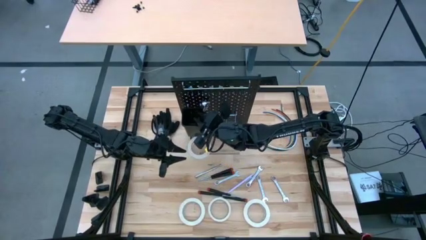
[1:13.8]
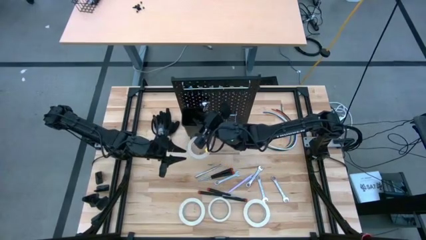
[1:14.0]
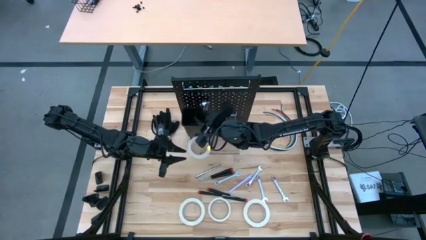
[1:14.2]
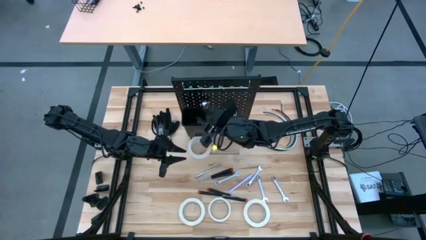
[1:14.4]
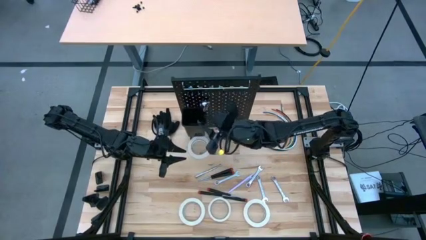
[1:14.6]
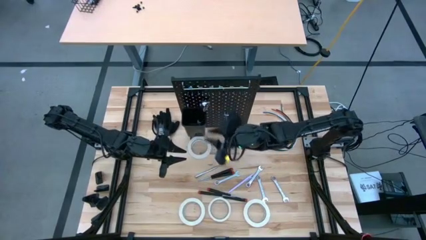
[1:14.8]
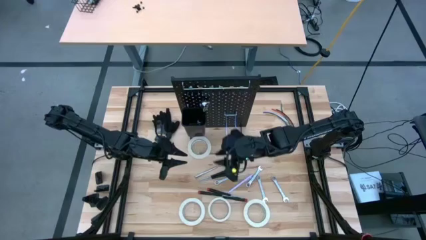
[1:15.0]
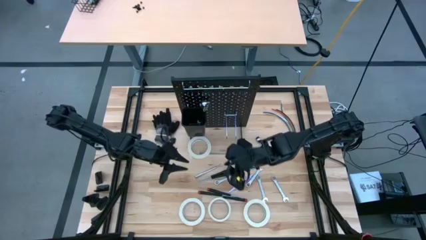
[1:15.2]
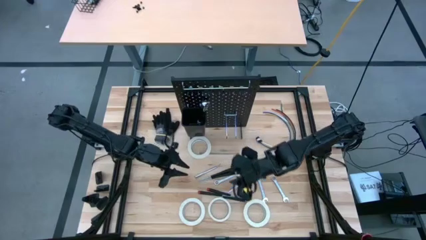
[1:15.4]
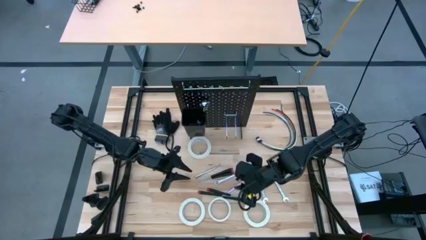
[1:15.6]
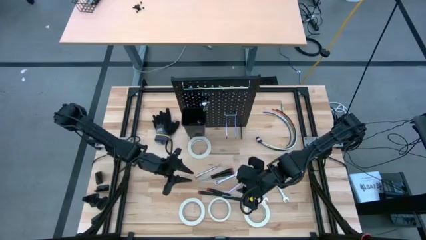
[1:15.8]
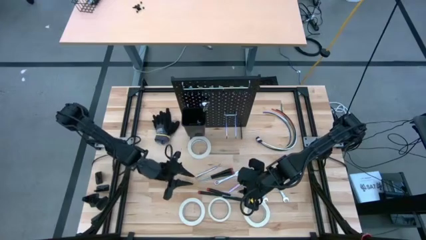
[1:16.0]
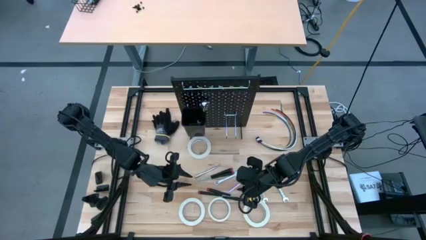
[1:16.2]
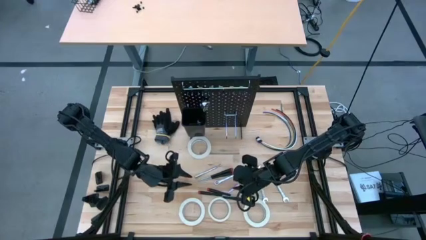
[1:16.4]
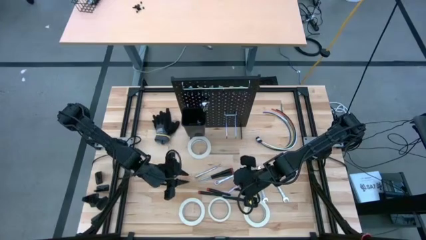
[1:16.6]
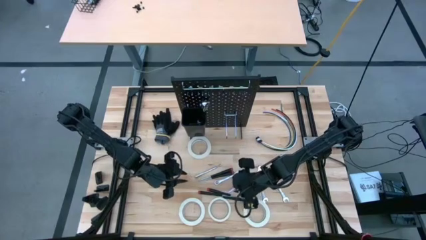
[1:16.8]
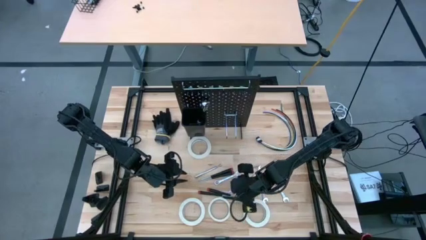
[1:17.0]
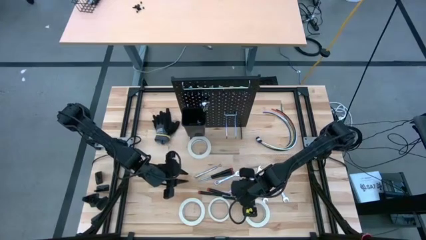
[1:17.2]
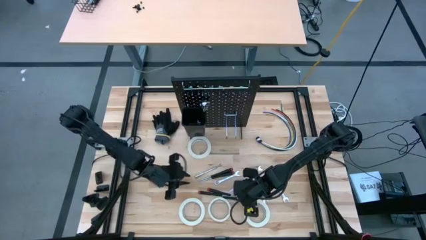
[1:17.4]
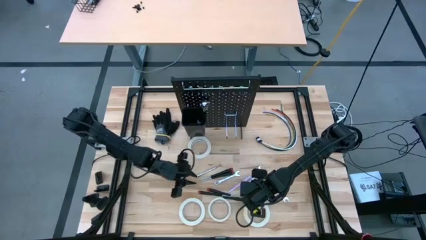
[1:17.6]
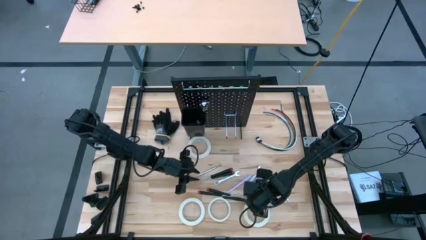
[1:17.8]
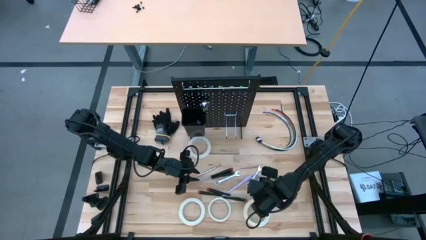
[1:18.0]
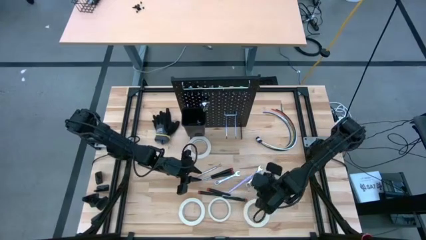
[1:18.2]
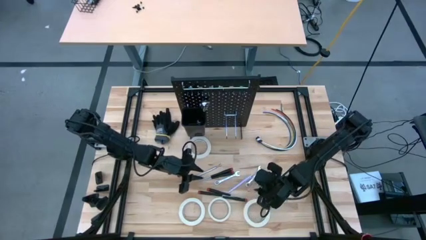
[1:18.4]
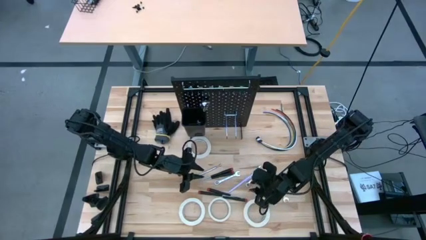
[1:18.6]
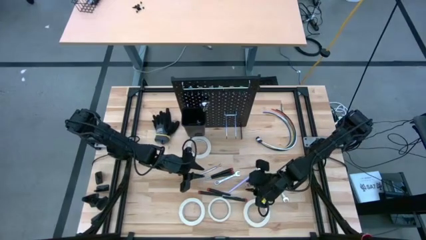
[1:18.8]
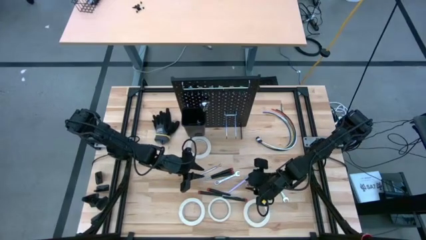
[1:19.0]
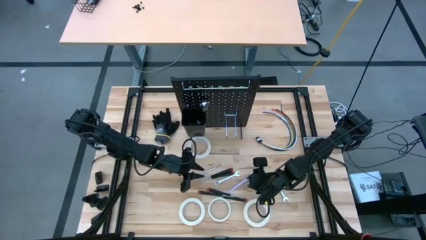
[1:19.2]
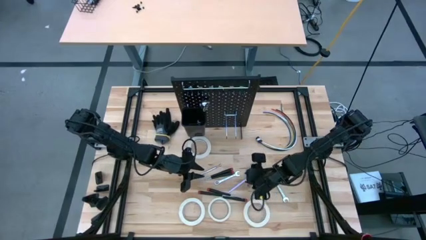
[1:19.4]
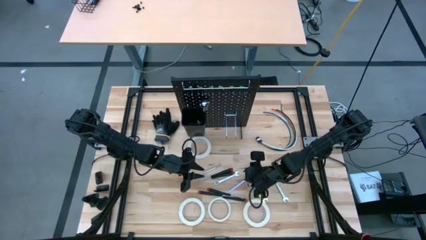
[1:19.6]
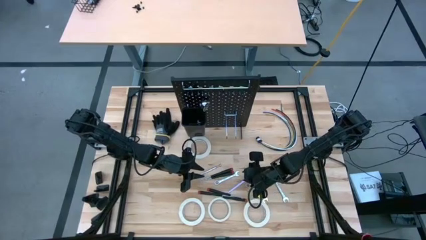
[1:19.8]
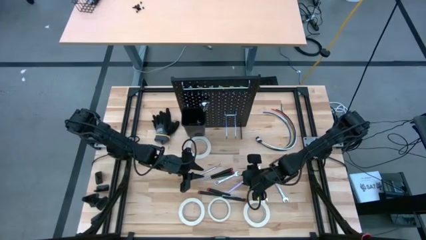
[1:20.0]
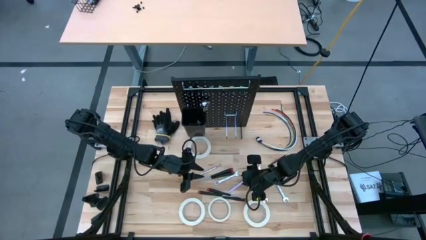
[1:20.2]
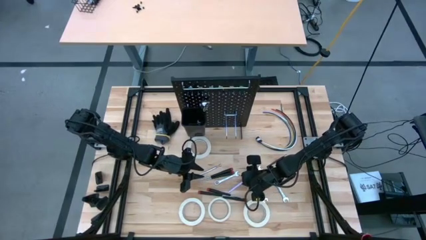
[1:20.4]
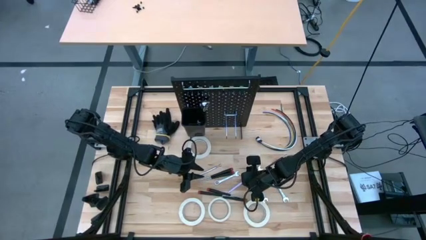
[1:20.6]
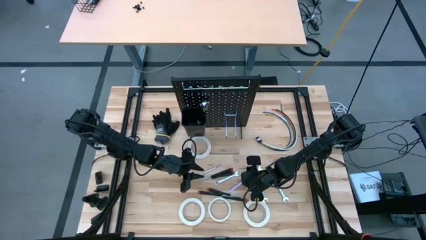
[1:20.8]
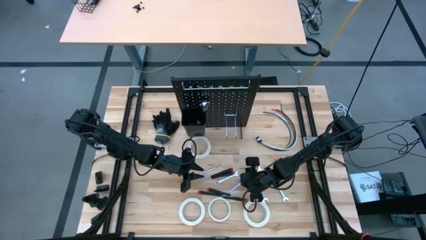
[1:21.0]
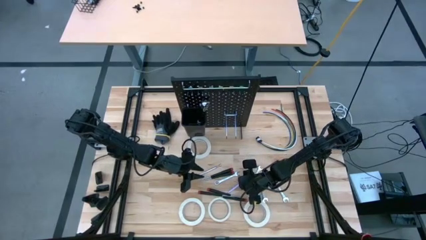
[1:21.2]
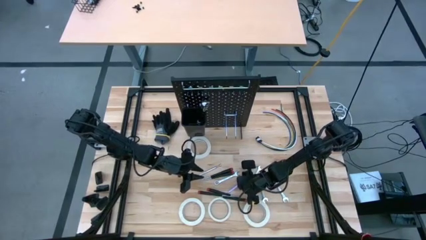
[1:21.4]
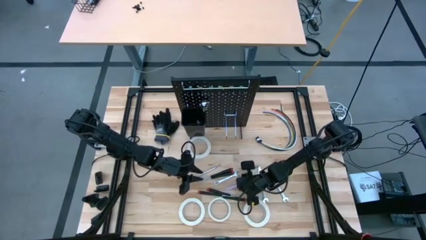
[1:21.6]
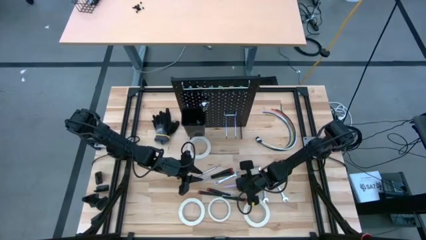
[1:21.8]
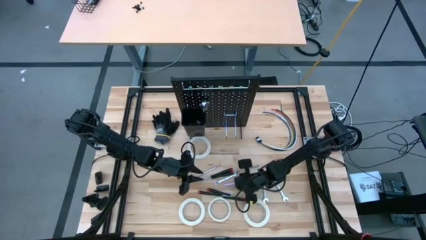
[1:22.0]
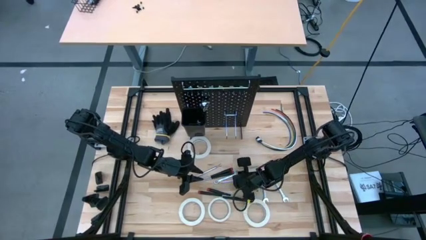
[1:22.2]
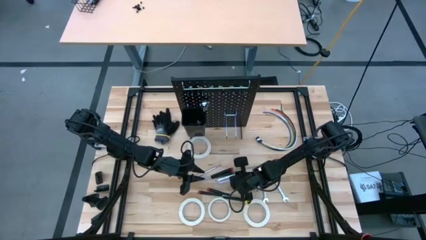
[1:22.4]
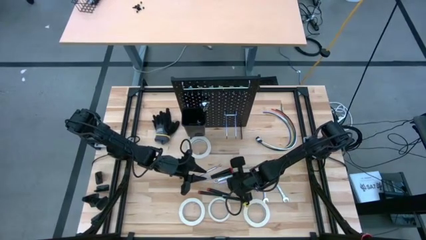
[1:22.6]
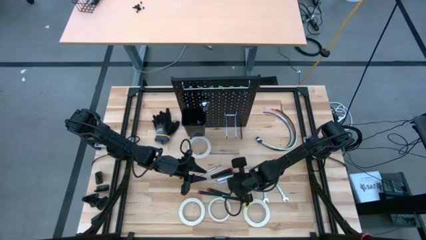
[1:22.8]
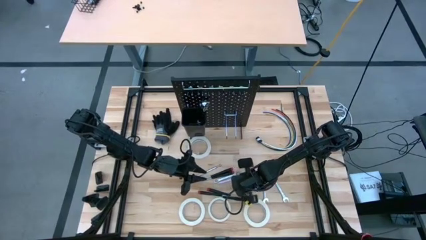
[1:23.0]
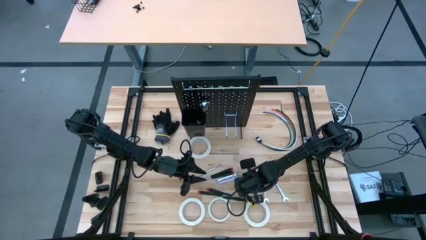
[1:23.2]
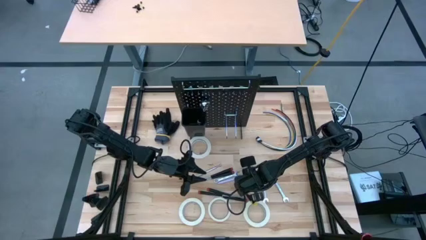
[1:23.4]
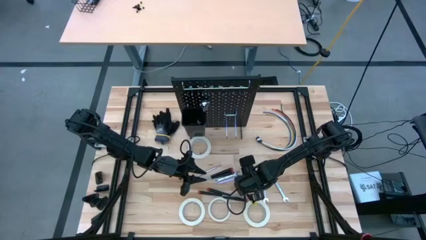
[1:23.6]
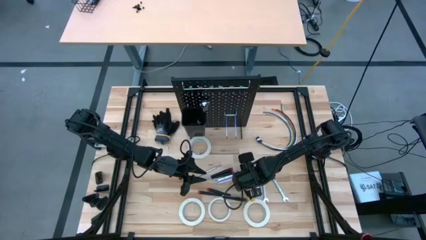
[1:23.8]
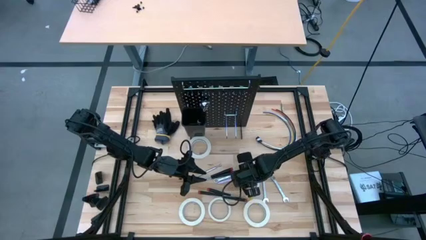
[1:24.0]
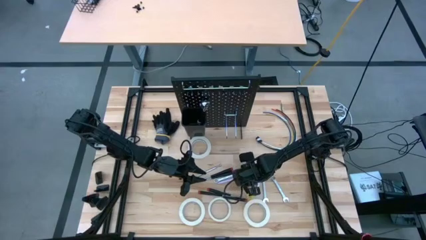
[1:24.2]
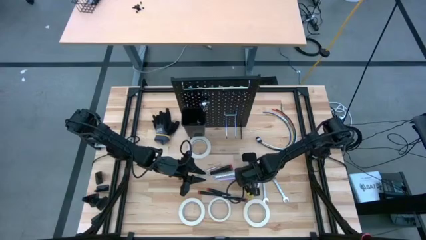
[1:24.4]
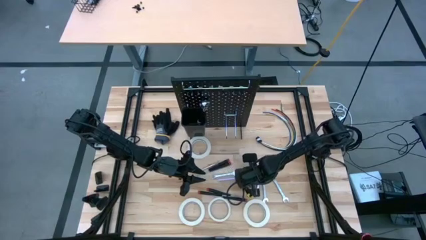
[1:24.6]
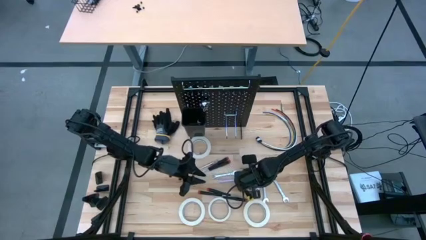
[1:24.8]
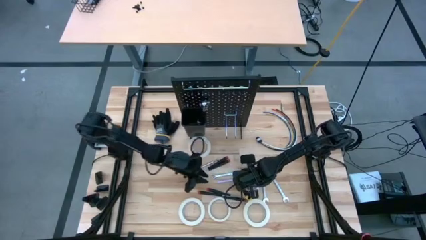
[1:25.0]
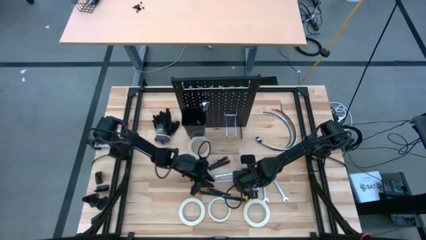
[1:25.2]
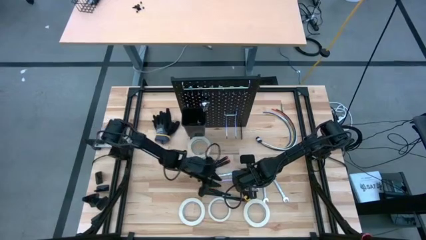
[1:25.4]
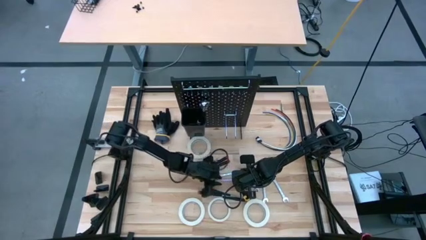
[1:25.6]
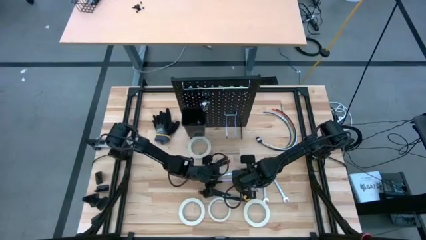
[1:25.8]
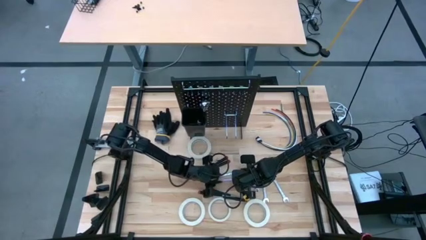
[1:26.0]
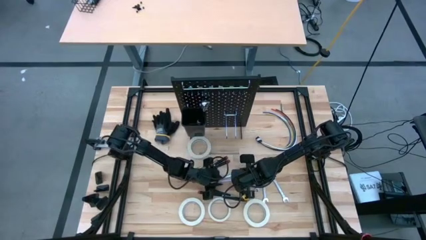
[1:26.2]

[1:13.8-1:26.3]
Task: Hang tools onto peg board
Put the purple pen into the black bin on the peg board

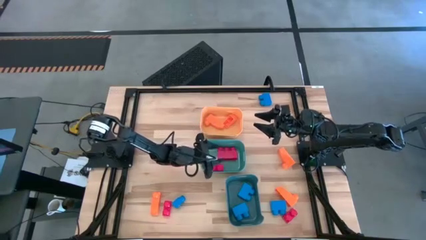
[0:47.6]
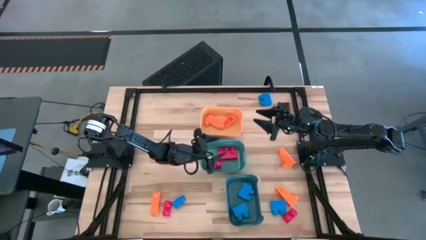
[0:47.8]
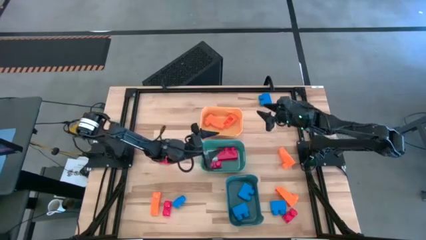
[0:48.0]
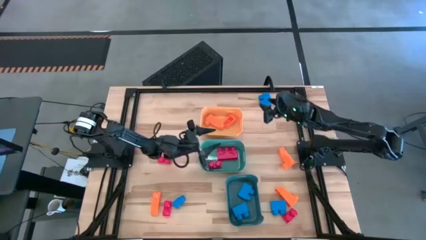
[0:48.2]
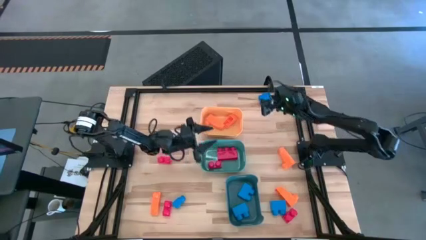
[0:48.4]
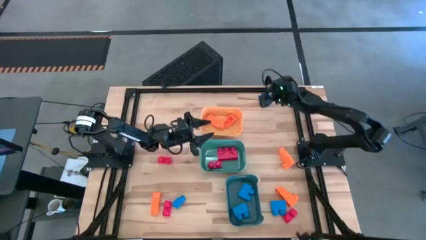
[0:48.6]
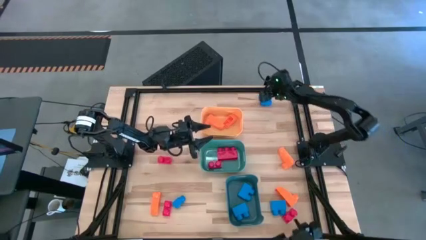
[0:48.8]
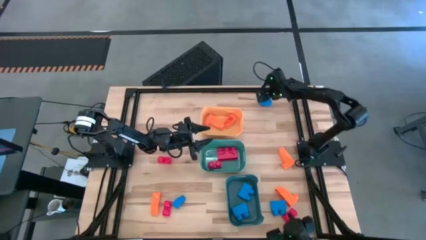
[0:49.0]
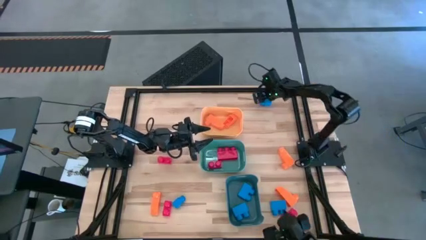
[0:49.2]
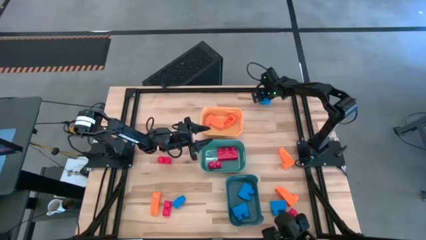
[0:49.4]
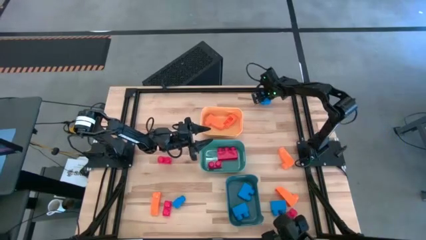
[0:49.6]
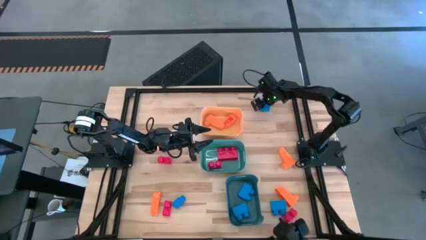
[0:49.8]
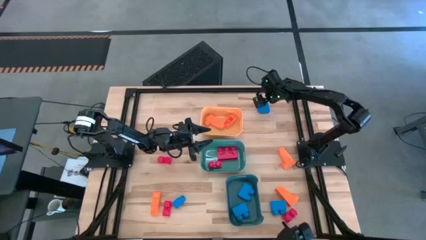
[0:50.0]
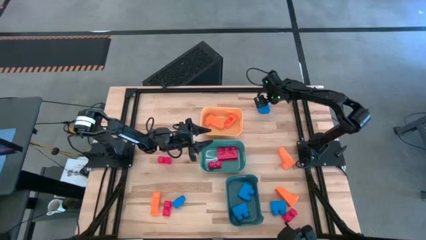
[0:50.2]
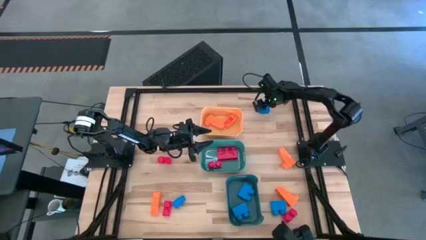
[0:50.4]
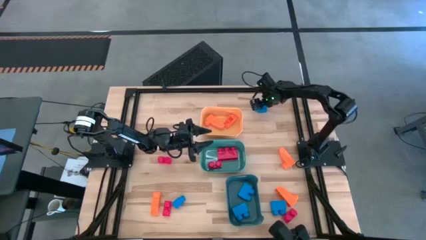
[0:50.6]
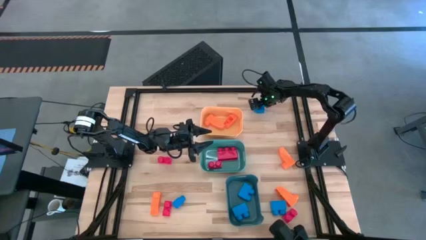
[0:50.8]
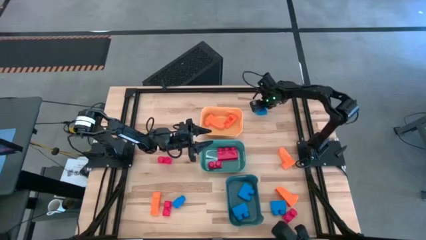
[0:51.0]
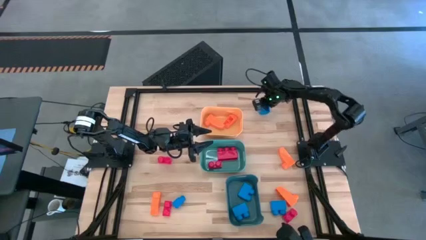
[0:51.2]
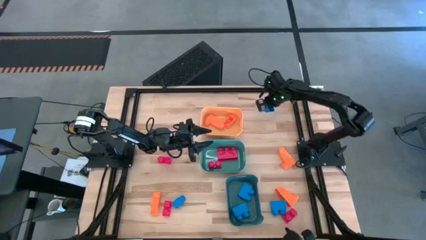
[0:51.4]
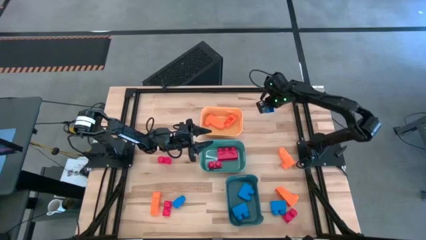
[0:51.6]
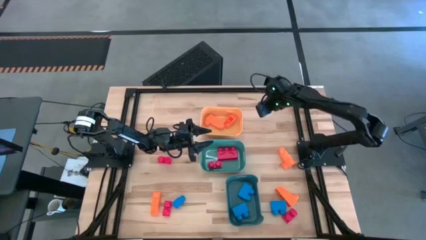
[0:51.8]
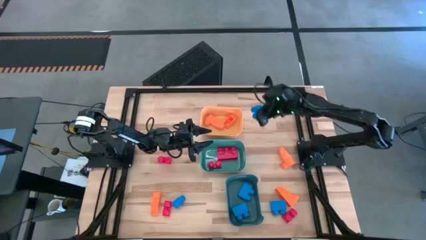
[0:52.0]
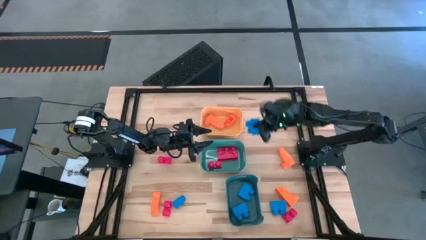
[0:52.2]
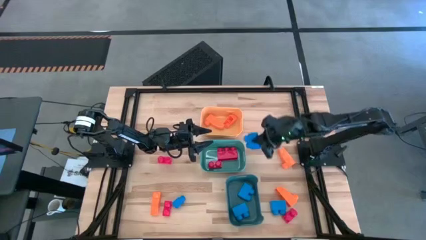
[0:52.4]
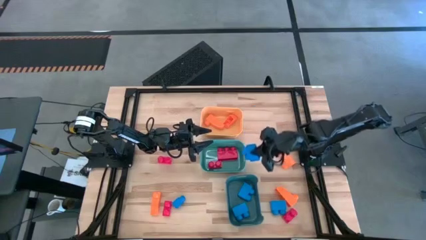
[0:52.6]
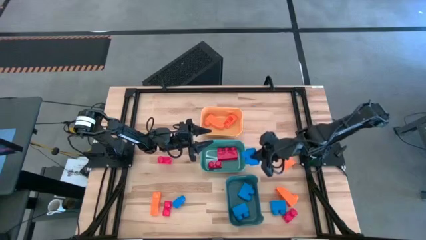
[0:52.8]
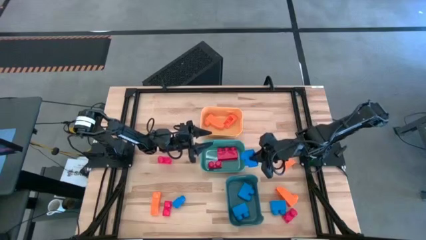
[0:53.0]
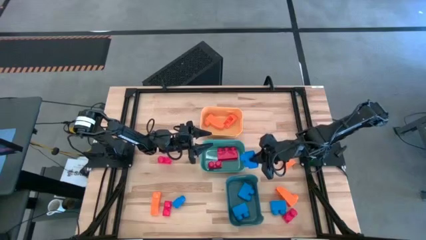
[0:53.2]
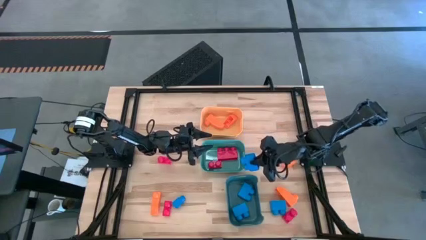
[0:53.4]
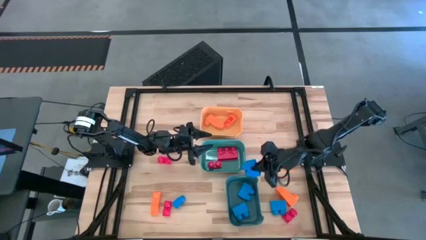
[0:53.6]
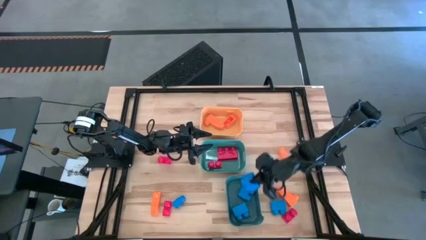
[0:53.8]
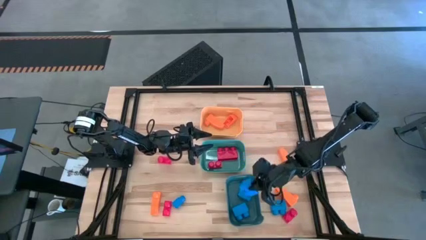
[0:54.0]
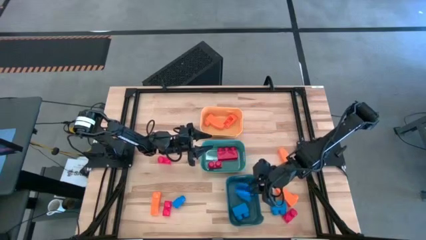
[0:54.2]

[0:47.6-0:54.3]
Task: Sort & place blocks by color
Put the blue game piece into the blue bin
